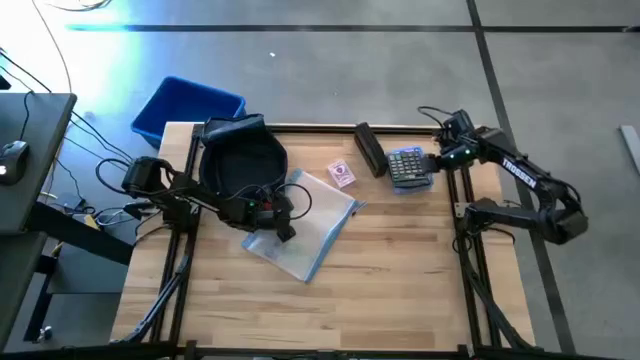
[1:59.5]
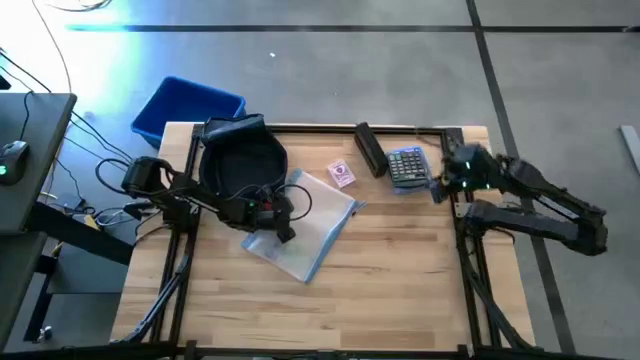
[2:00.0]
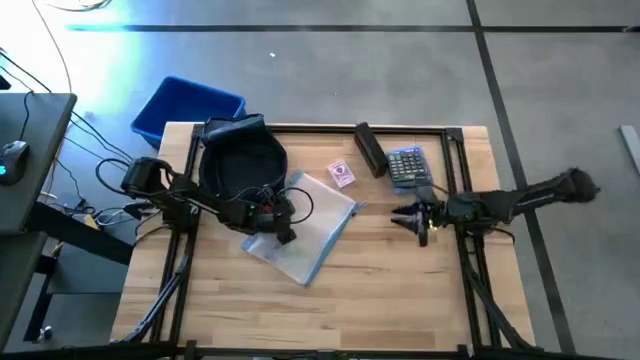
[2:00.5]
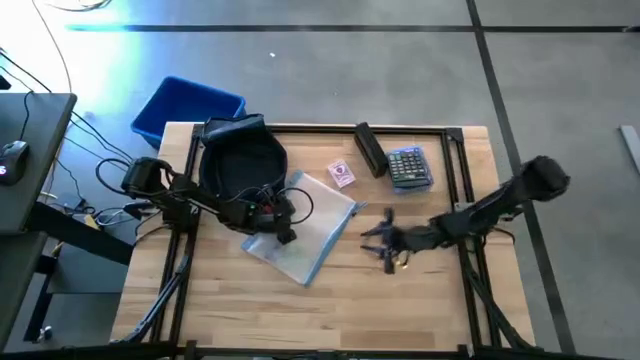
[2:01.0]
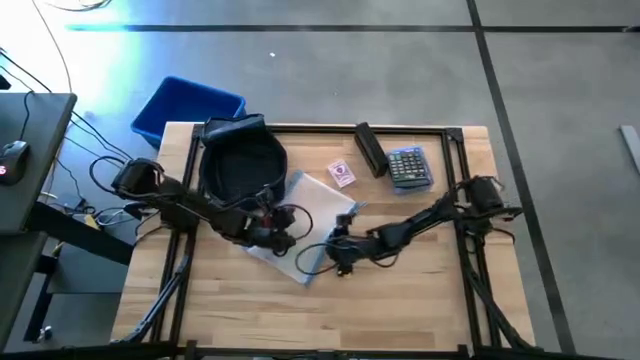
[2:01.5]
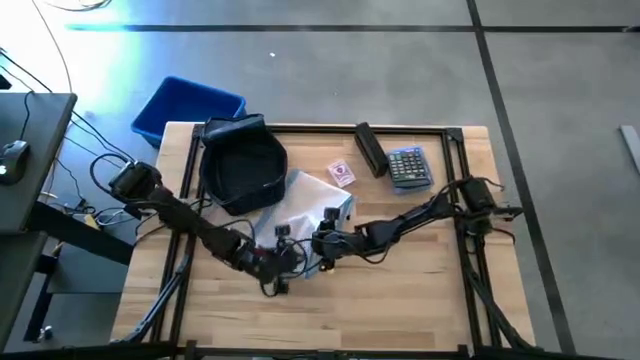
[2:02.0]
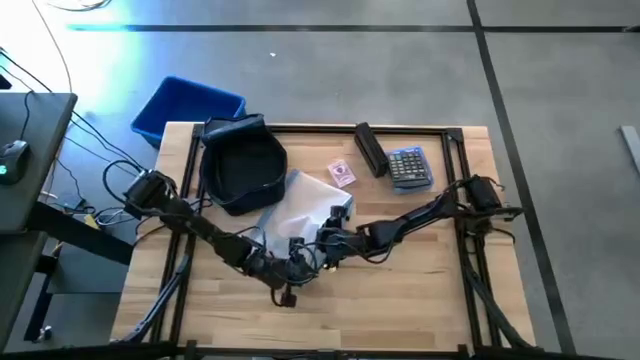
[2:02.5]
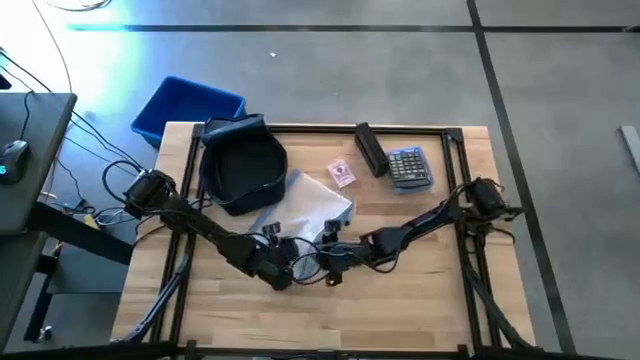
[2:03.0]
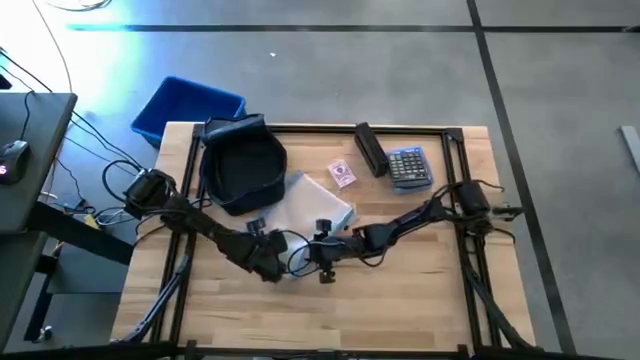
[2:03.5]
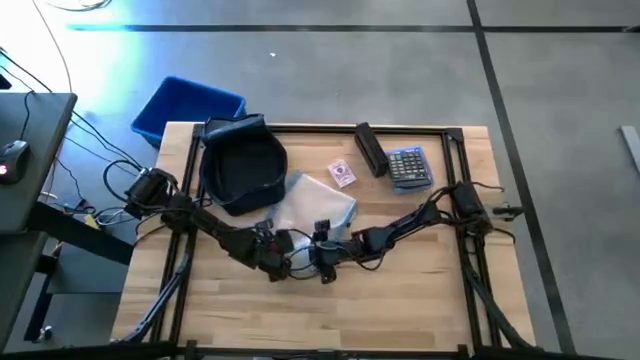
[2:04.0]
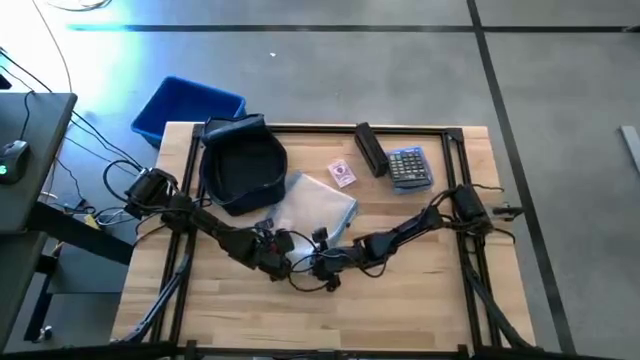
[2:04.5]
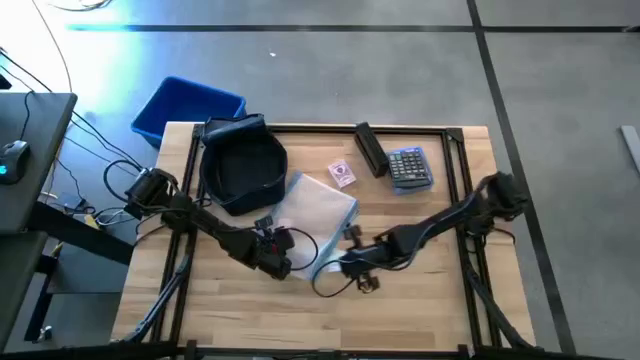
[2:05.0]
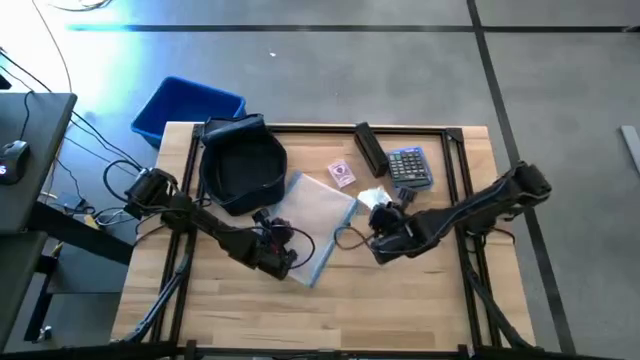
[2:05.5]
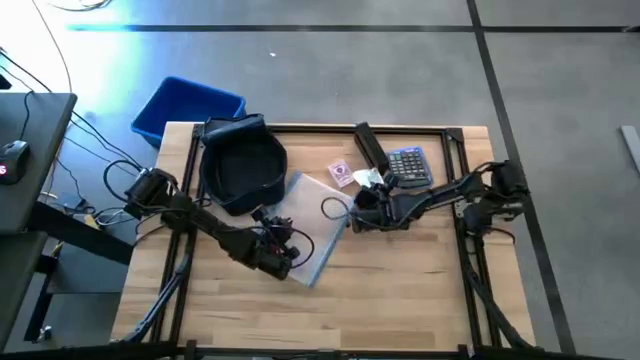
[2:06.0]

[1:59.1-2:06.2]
Task: Unpack backpack
Remove the green packed earphones from the white zip bag

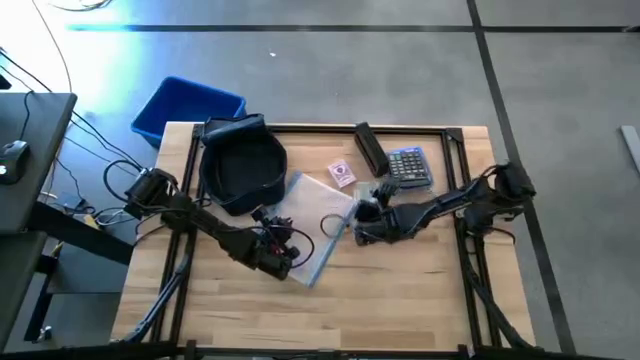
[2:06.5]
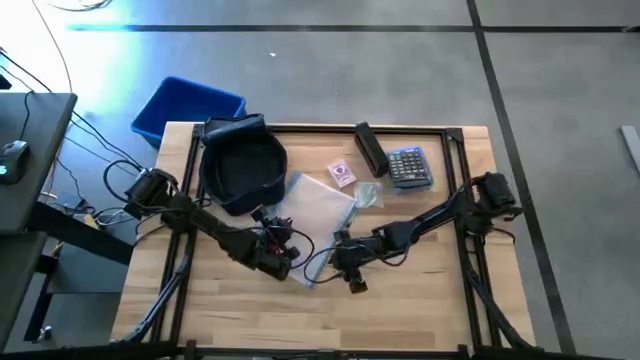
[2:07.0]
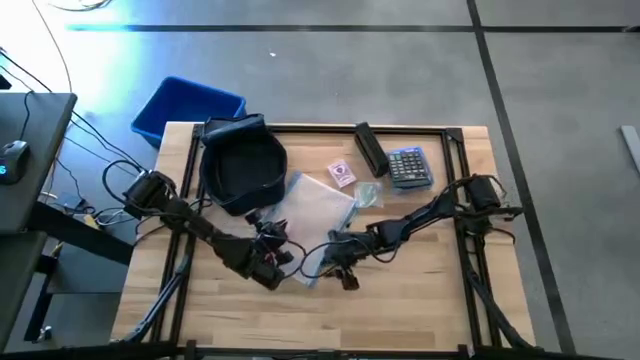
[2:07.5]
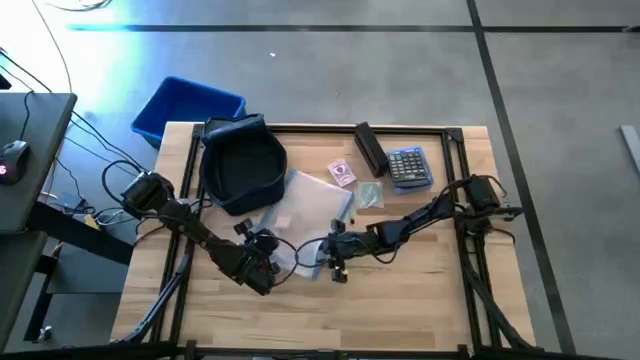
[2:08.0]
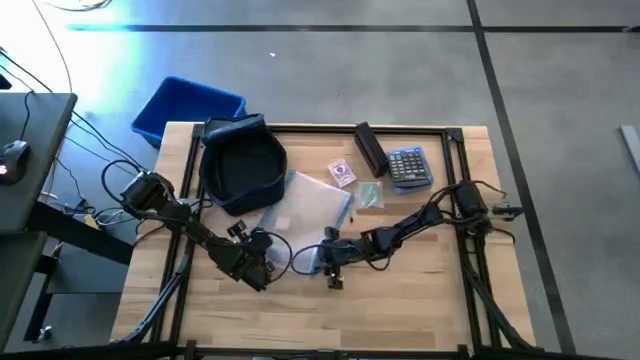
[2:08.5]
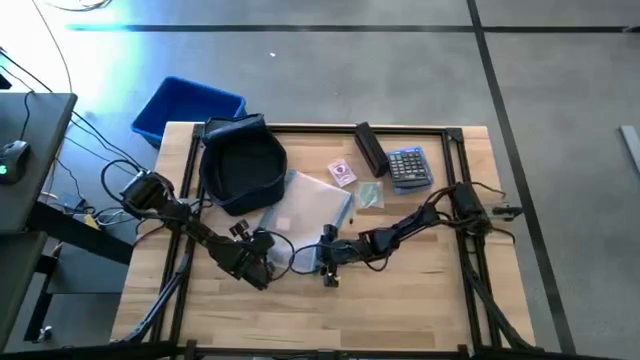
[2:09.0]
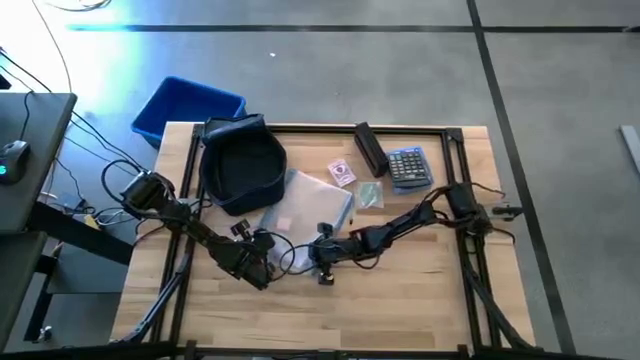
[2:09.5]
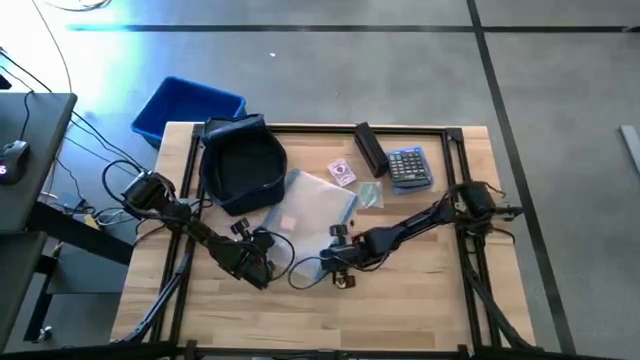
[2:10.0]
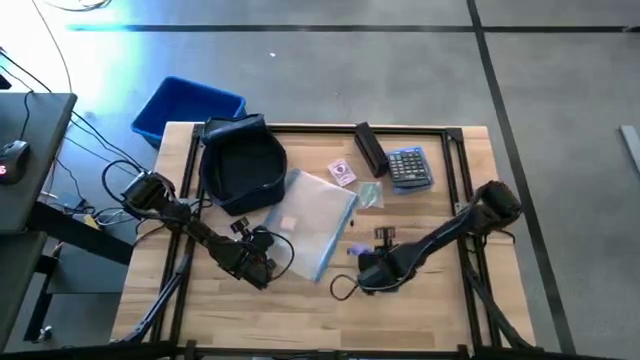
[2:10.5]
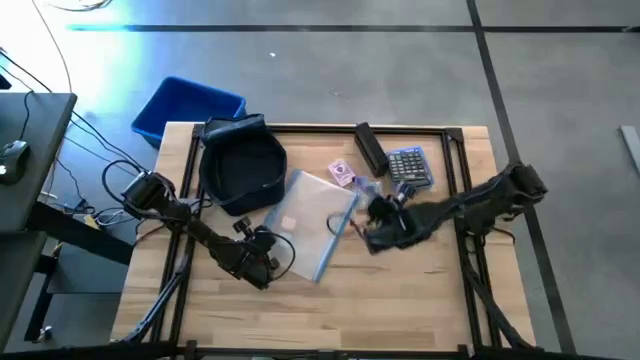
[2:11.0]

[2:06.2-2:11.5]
Remove the purple snack bar from the white zip bag

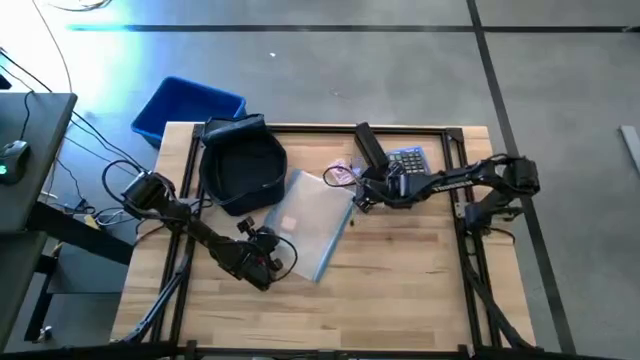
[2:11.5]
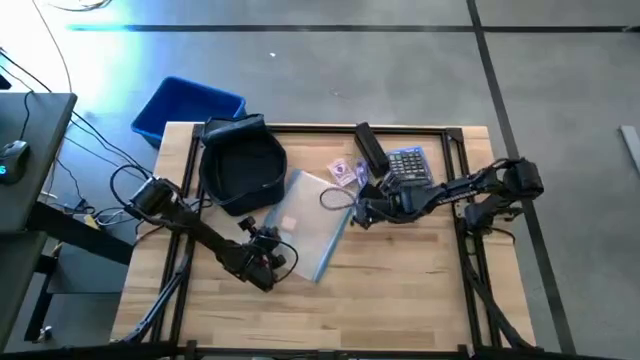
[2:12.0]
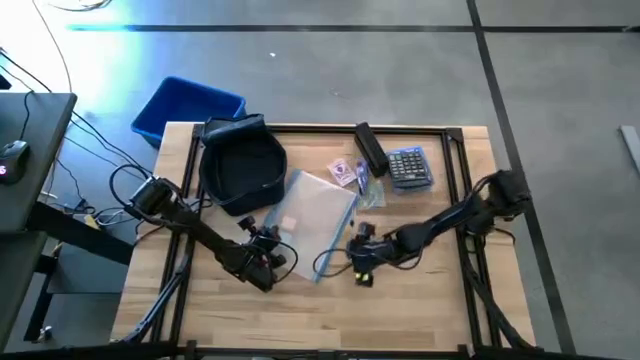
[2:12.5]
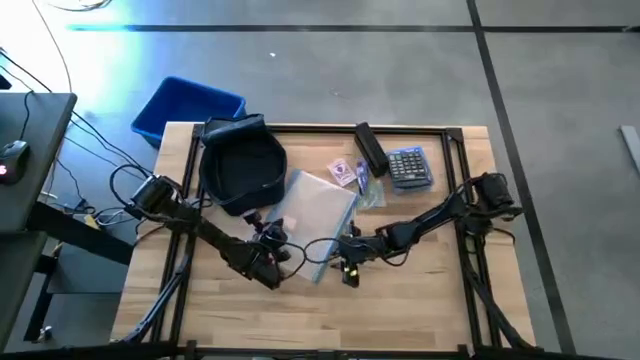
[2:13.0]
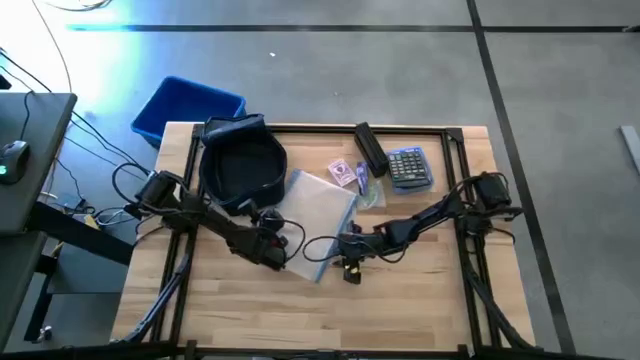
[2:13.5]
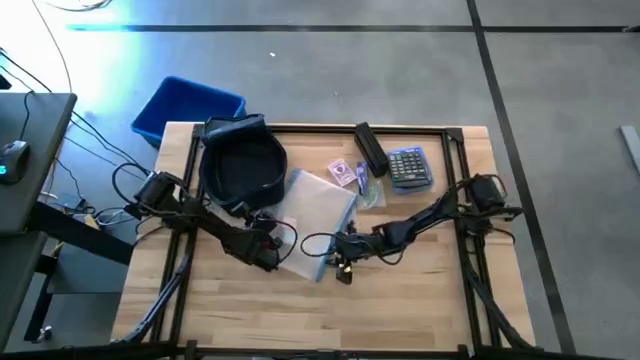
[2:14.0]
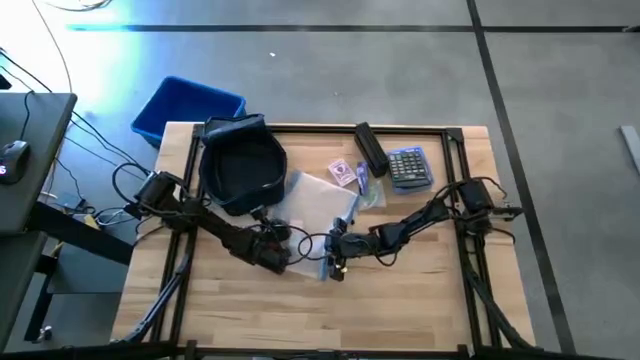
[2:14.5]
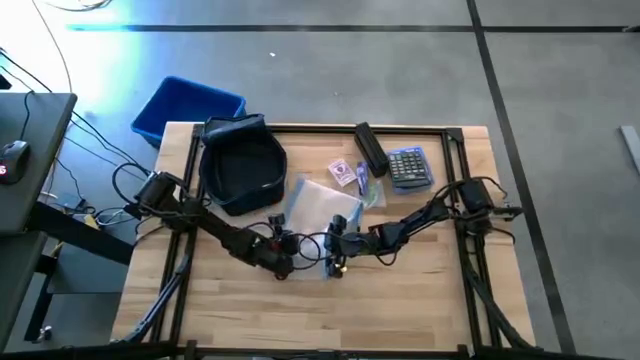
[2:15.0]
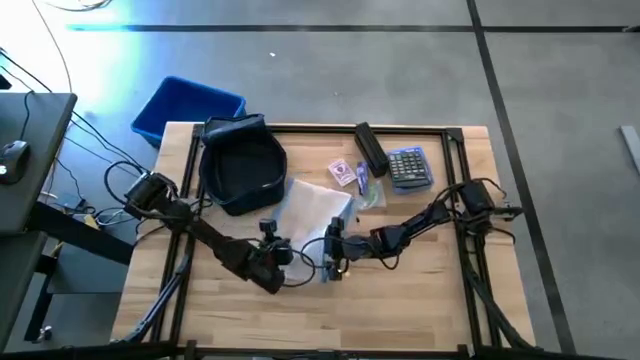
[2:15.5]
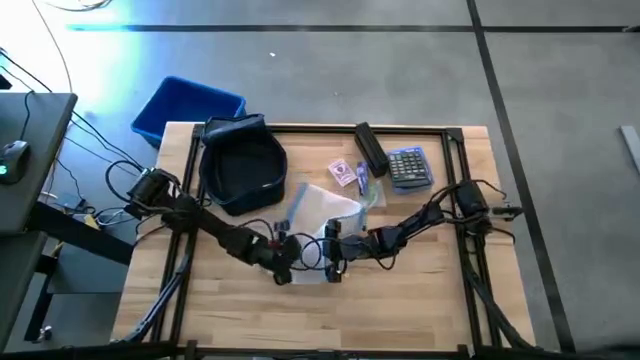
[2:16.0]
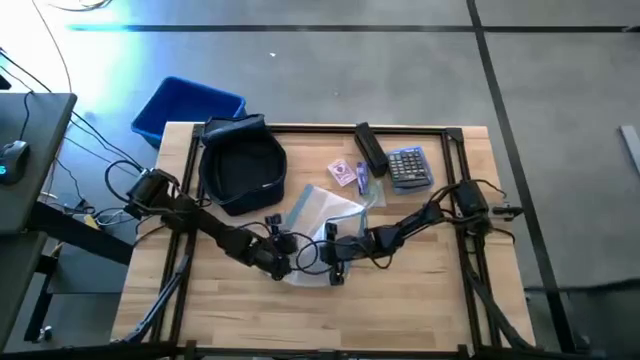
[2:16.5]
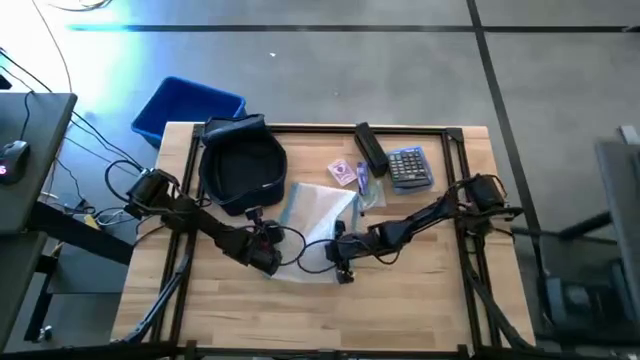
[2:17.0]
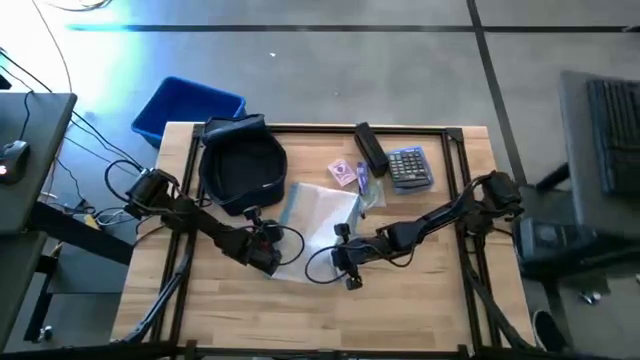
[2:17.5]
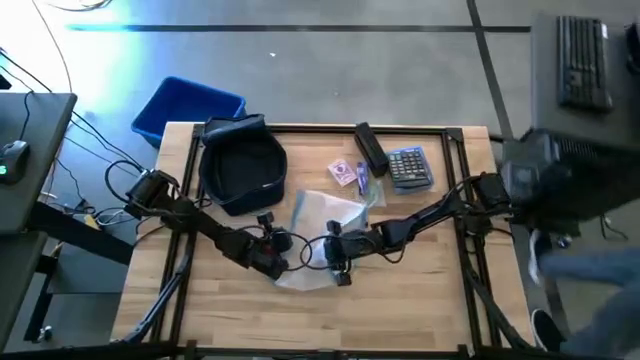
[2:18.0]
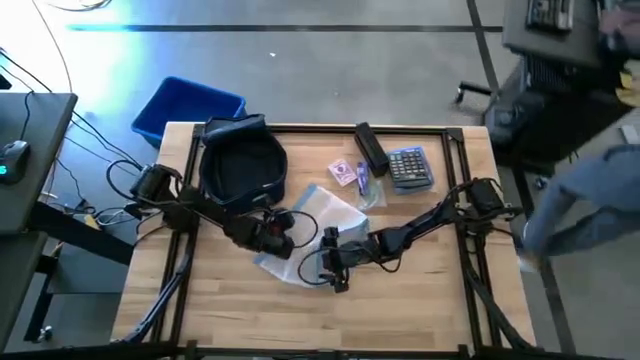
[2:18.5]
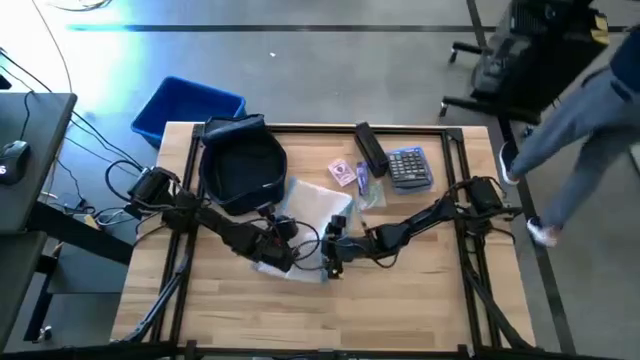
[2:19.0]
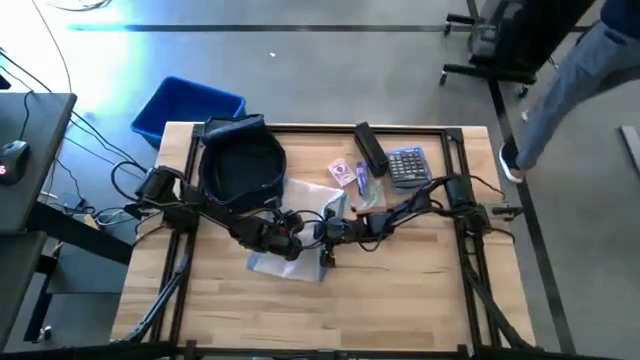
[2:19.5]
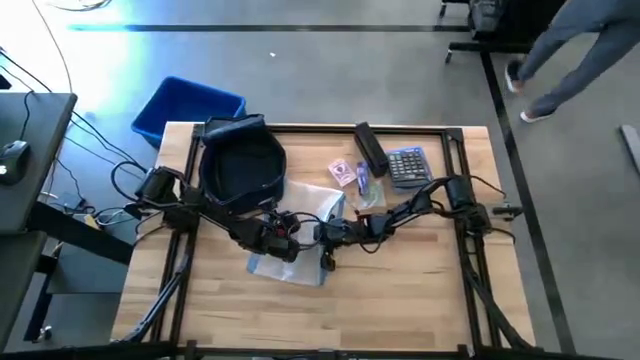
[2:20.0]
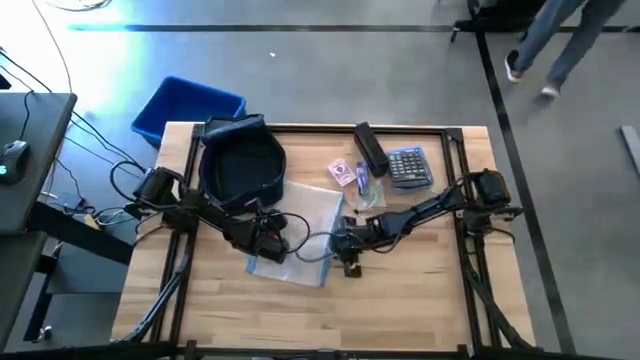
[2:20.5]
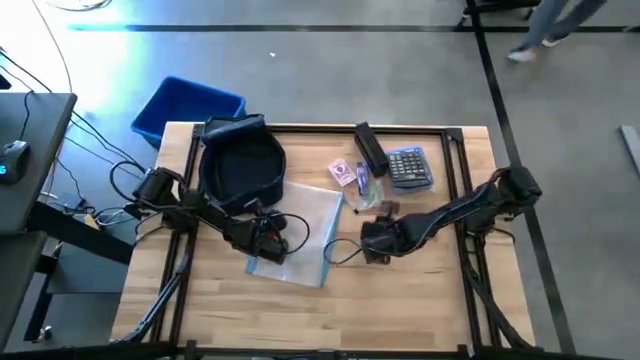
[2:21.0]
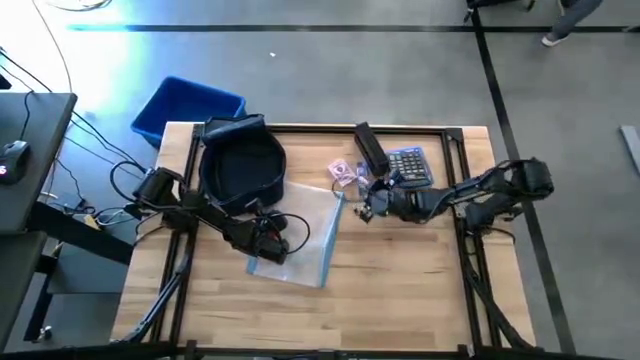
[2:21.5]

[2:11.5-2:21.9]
Remove the pink adapter from the white zip bag
